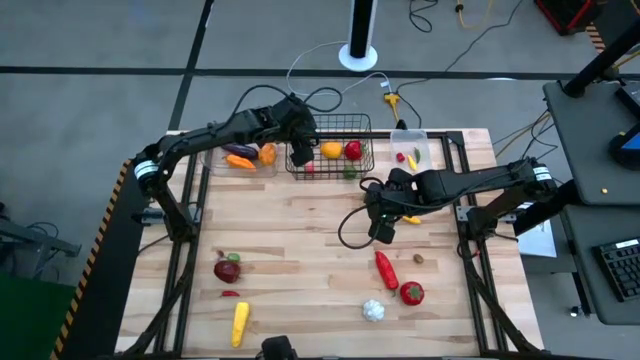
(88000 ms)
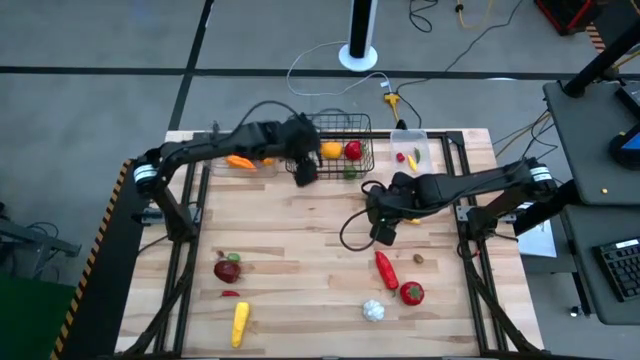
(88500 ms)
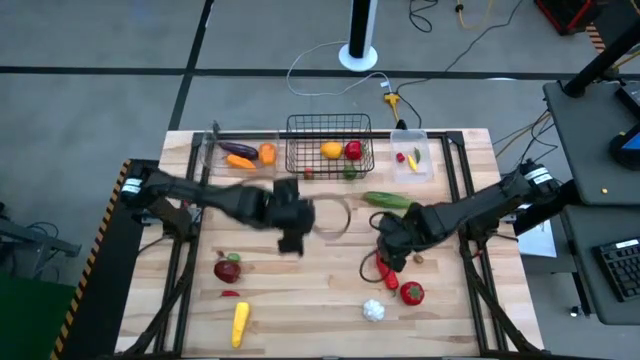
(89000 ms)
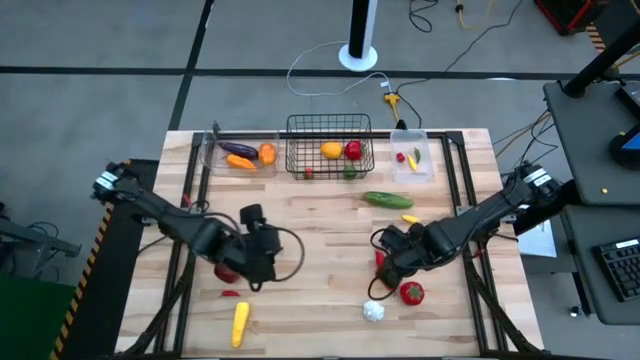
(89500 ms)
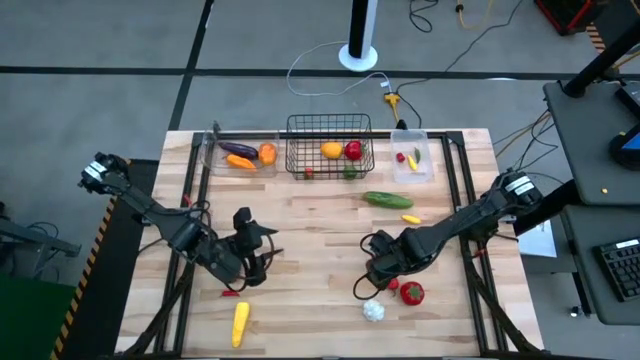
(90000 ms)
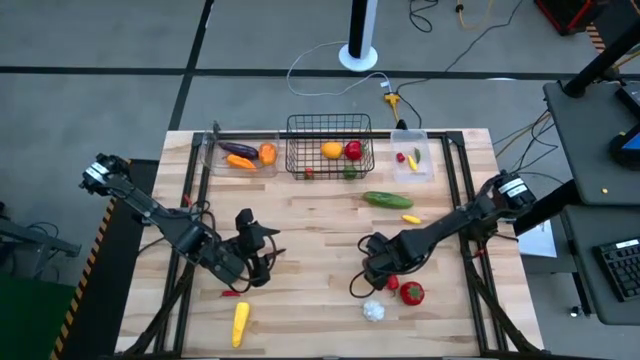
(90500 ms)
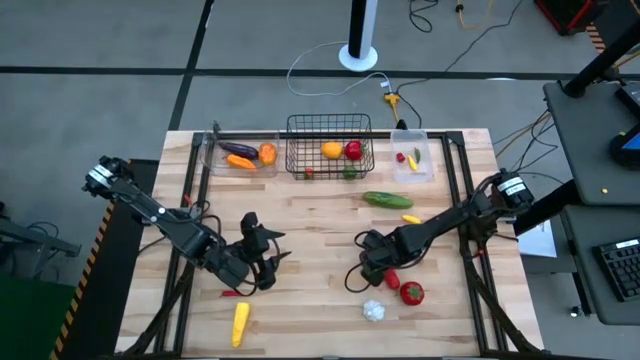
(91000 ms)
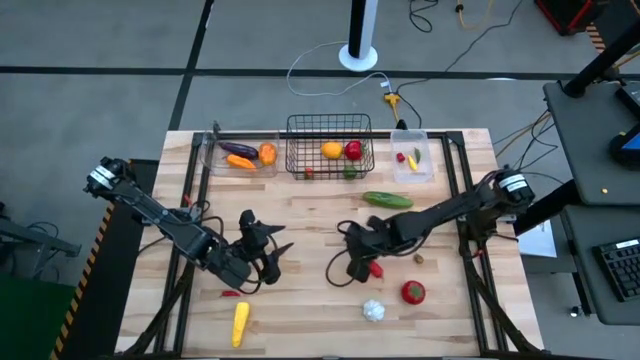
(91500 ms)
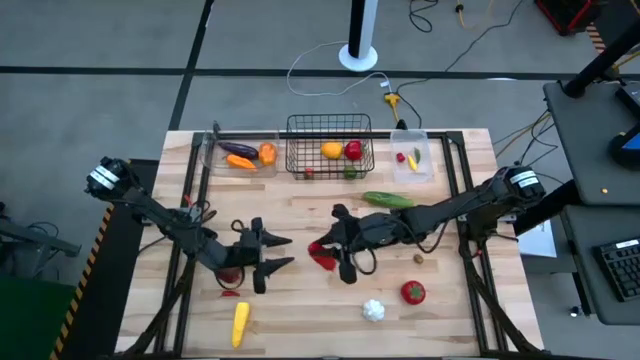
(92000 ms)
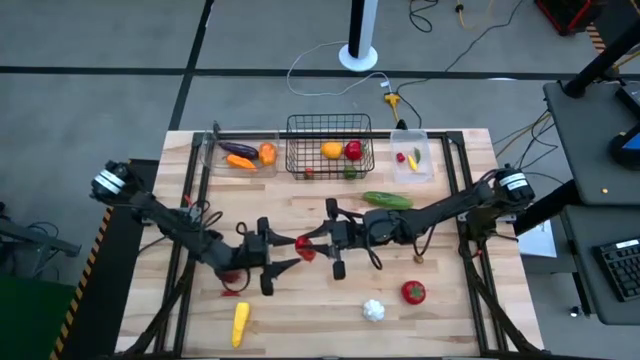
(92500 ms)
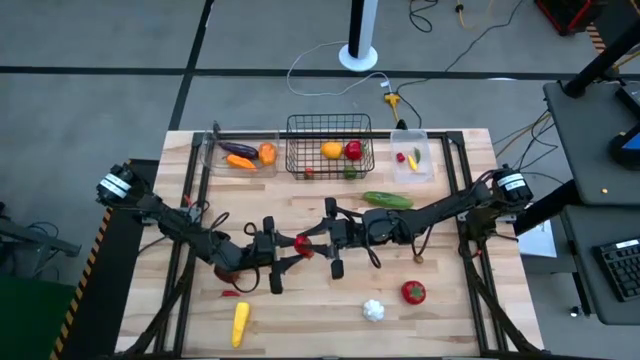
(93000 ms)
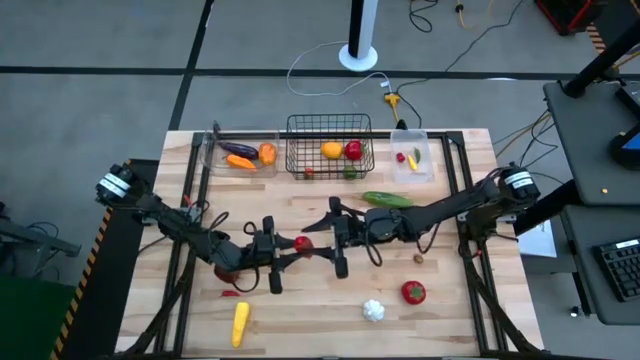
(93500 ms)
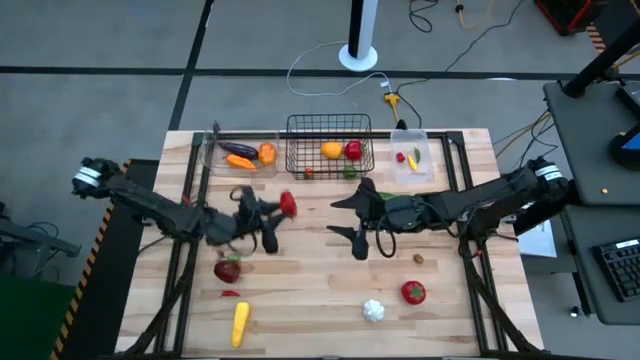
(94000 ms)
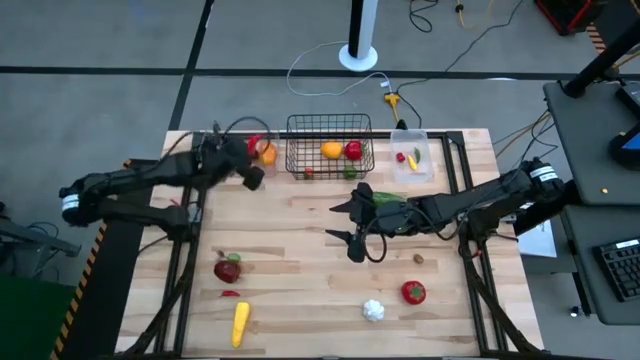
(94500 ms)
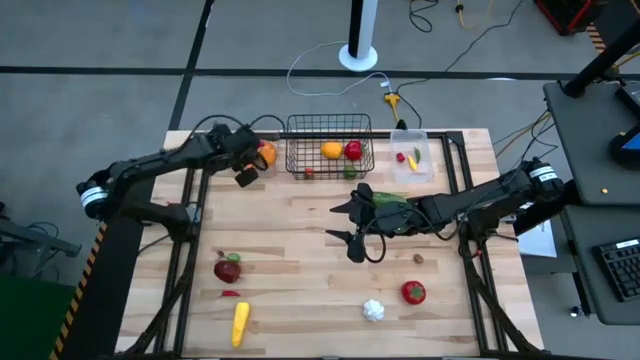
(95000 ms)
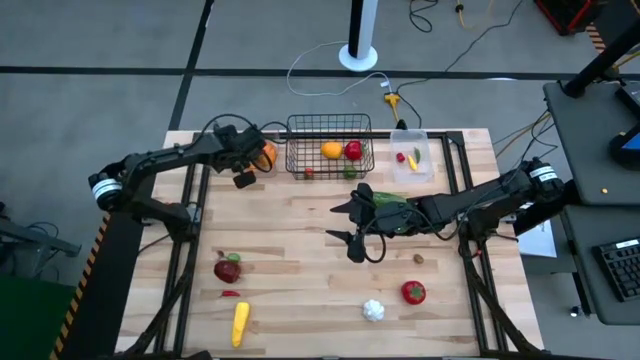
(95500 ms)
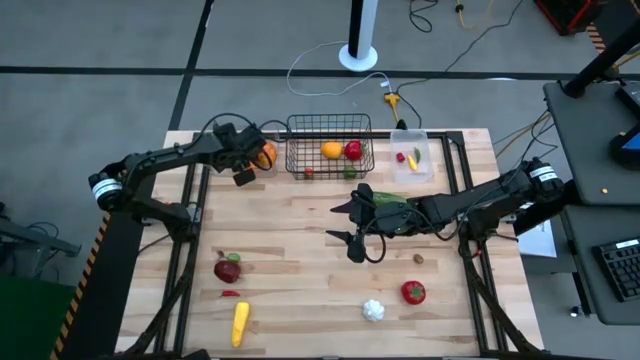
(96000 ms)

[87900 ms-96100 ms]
Task: Sort produce into baskets
Put the sweet long pepper into the transparent bin

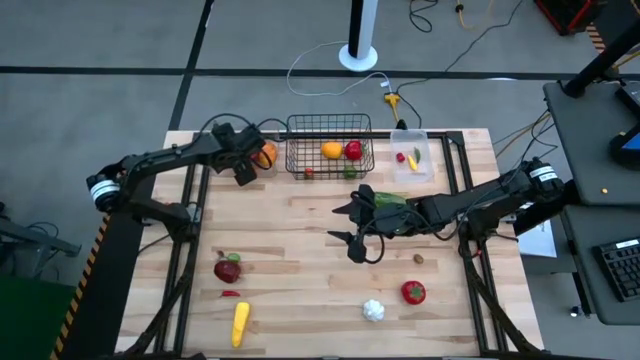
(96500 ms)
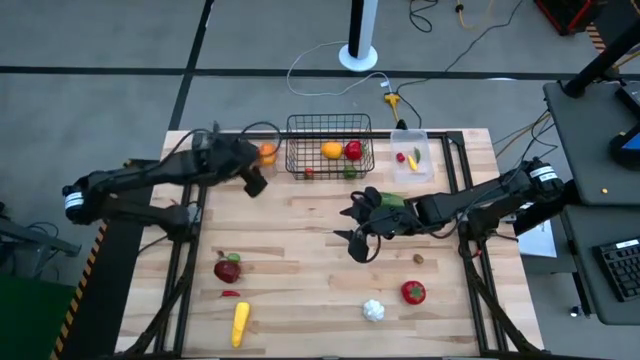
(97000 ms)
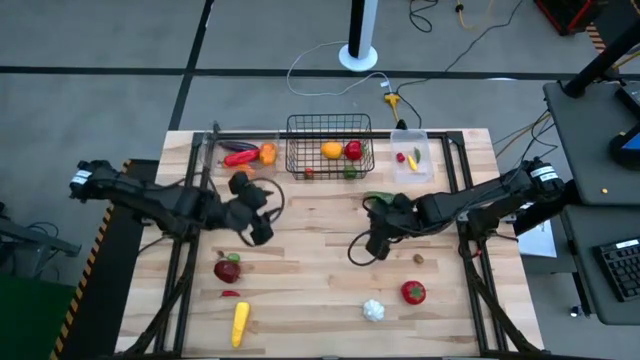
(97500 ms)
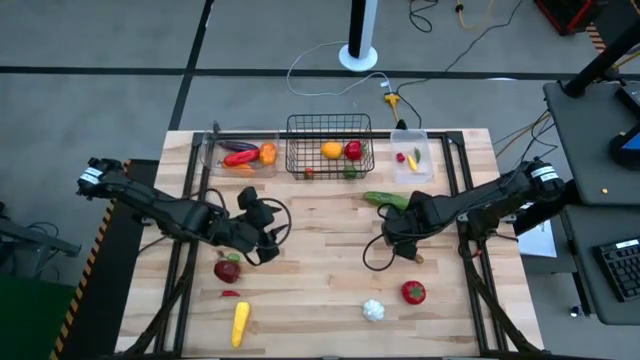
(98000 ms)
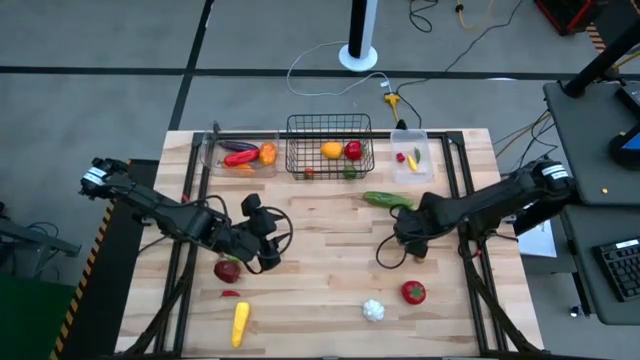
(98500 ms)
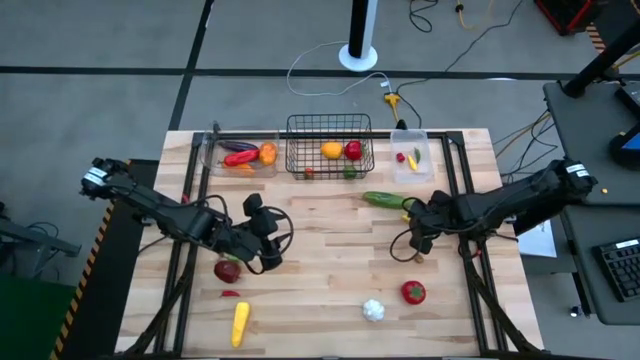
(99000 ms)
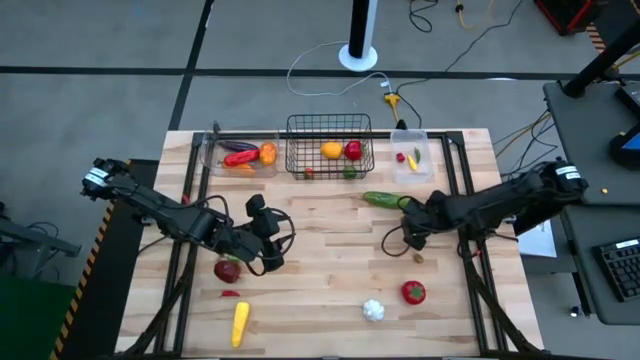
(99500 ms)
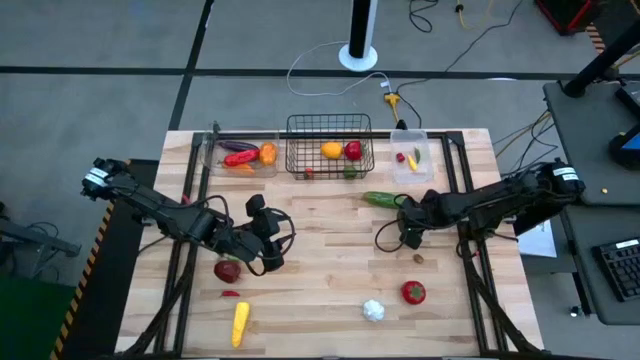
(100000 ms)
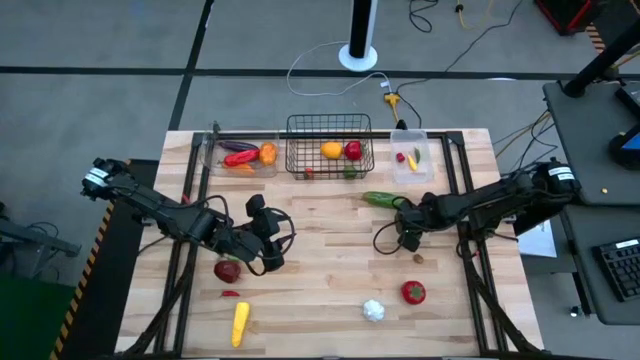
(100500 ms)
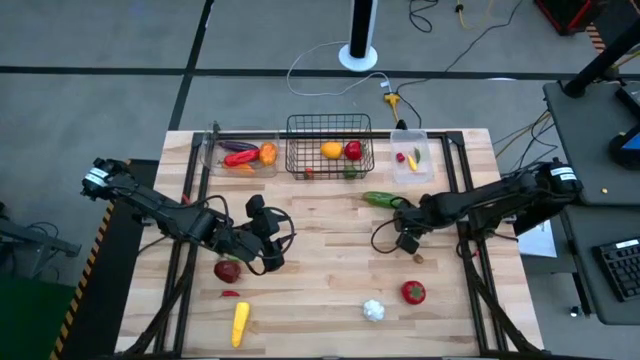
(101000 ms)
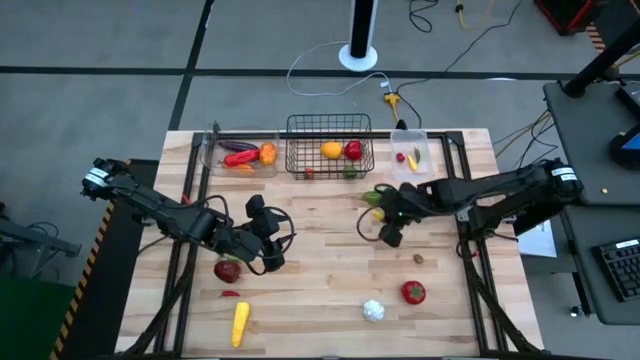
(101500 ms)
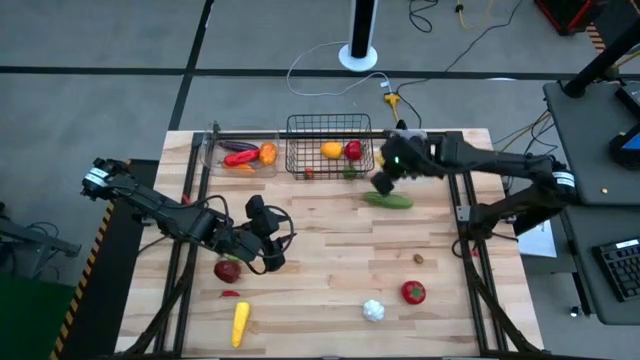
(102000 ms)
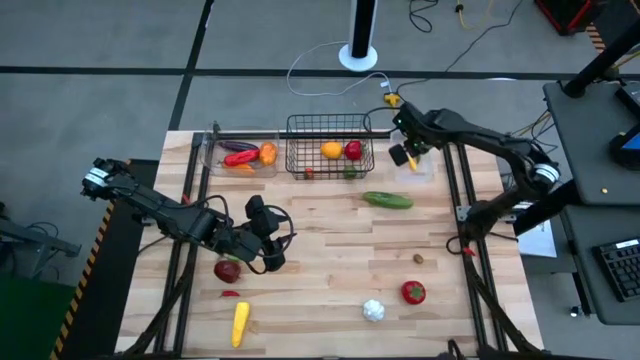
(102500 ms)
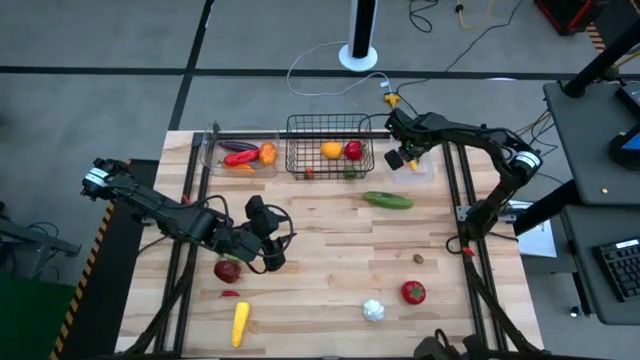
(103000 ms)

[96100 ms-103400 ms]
Put the baby corn into the white bin

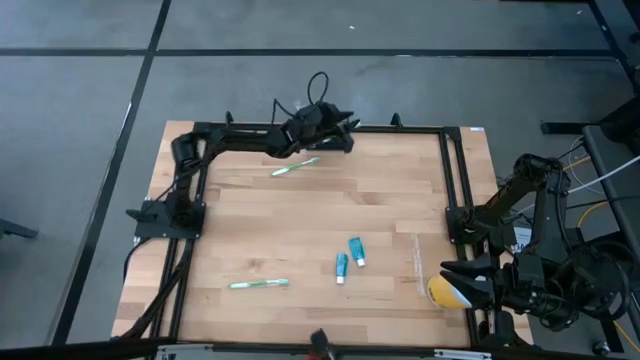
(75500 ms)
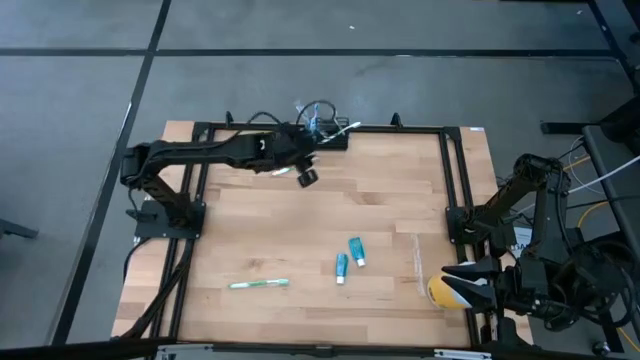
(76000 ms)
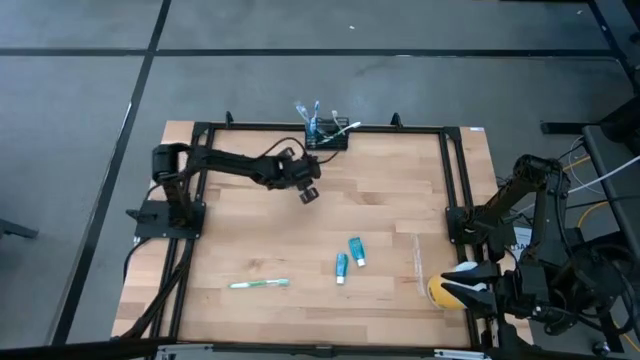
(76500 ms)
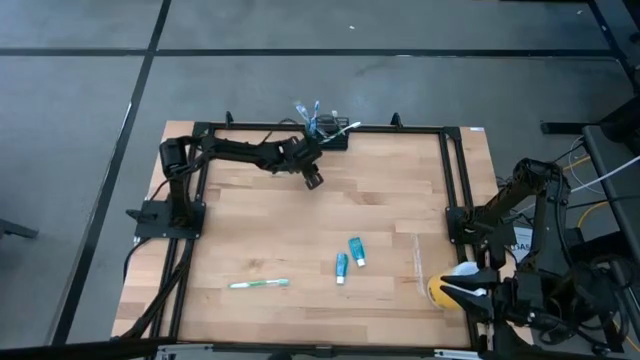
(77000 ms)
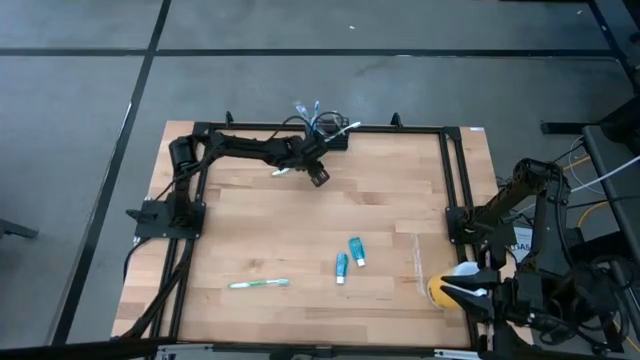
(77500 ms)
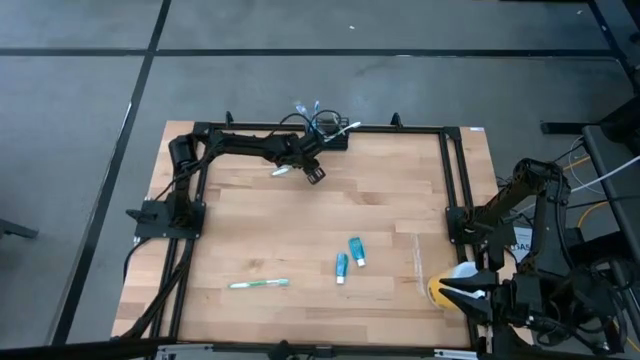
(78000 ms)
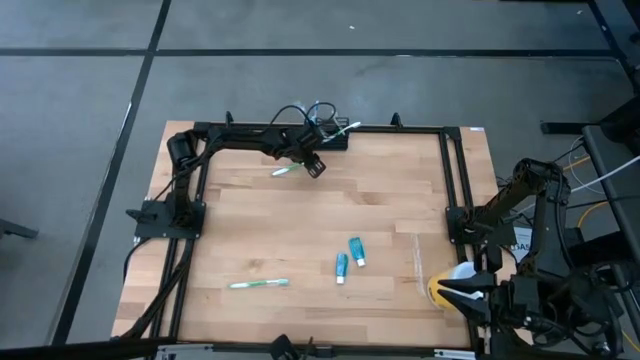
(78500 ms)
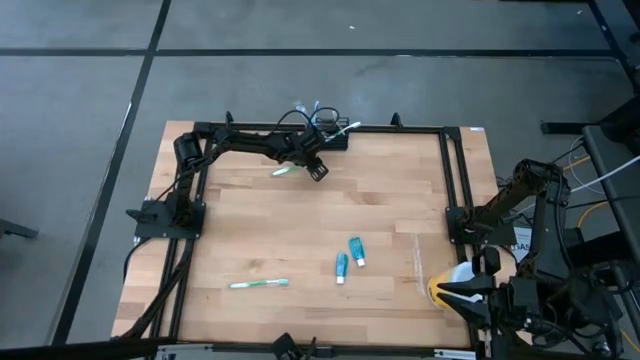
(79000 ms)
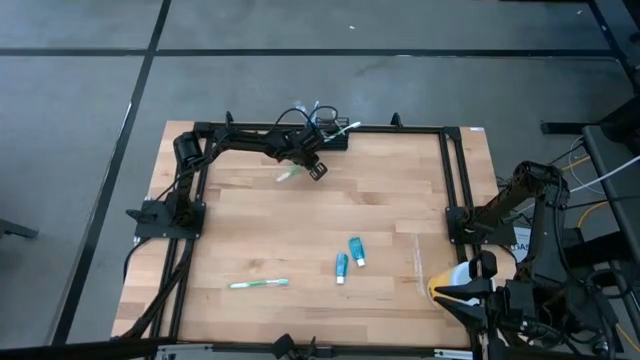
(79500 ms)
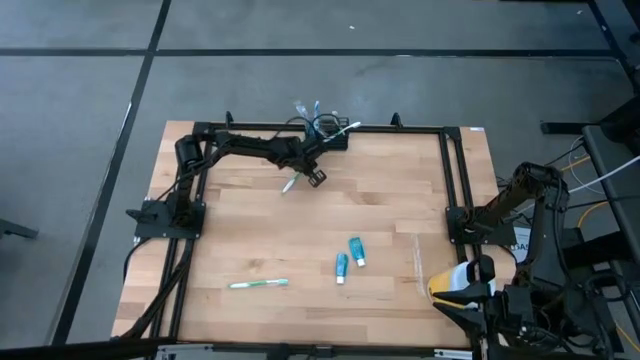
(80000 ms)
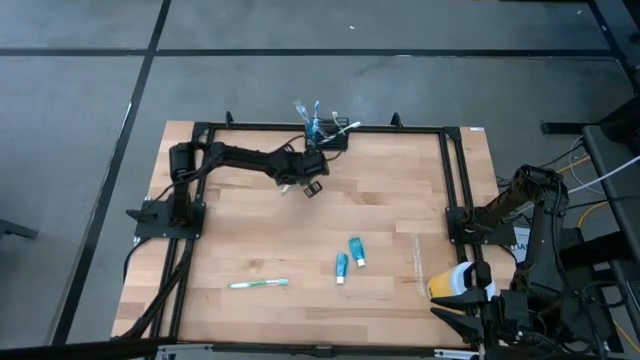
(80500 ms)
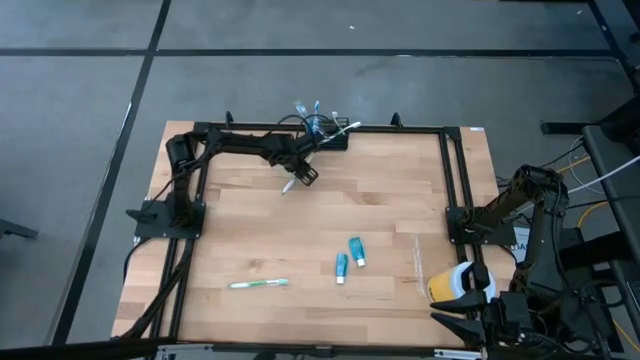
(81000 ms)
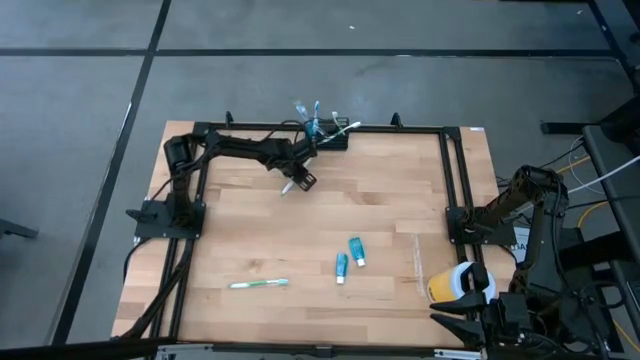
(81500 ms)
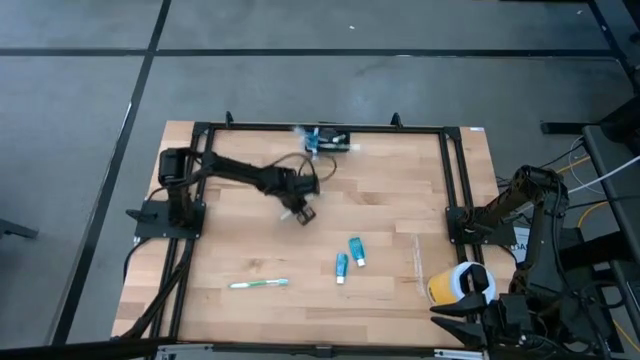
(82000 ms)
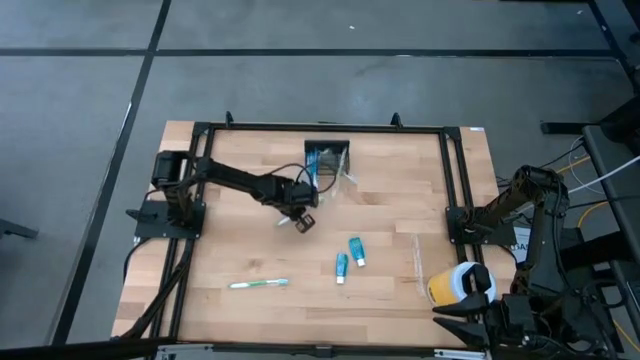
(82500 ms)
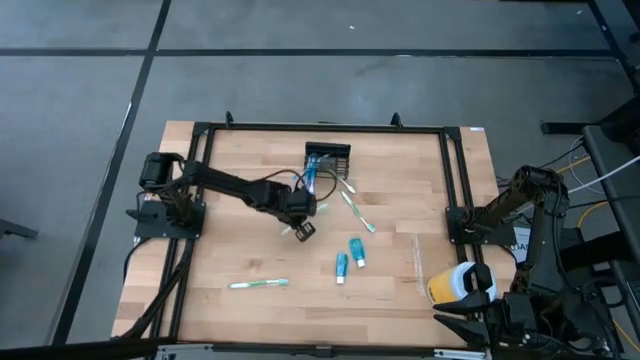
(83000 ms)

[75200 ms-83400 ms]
Task: Pick & Place toothbrushing station
Put the green toothbrush into the wire organizer
